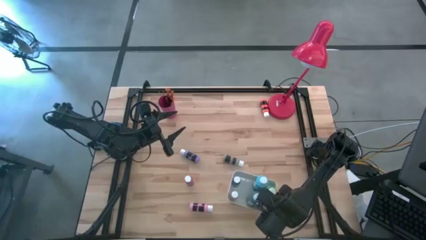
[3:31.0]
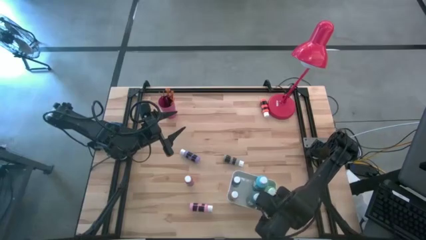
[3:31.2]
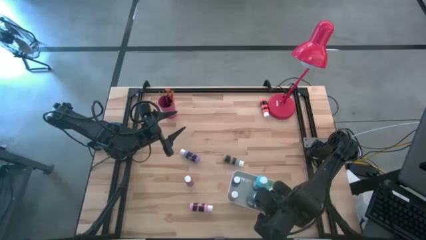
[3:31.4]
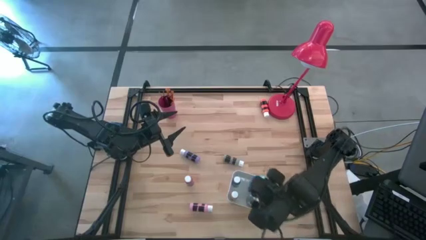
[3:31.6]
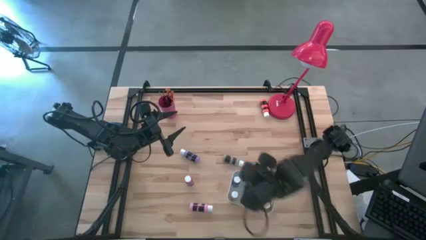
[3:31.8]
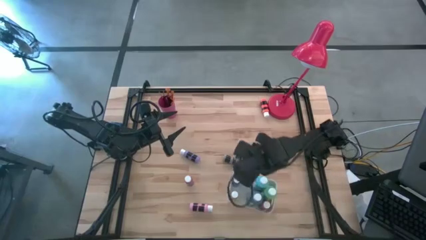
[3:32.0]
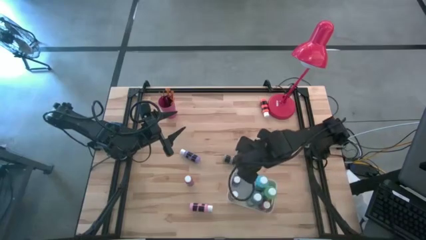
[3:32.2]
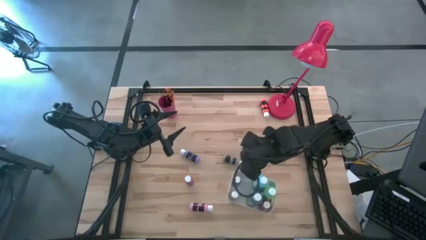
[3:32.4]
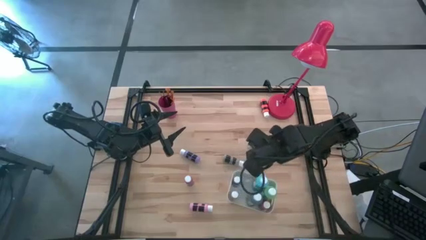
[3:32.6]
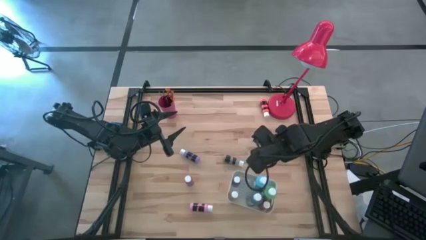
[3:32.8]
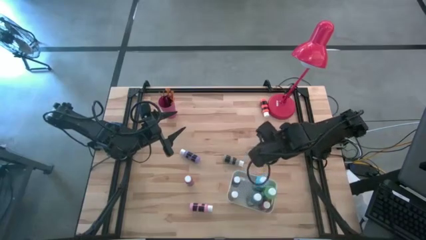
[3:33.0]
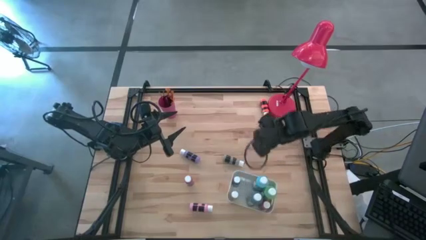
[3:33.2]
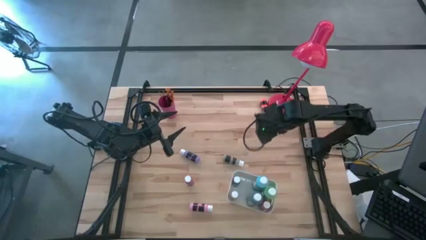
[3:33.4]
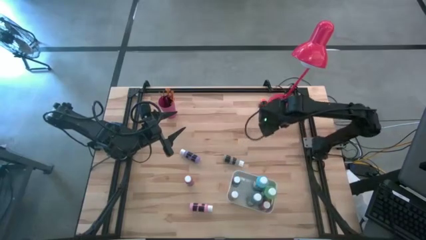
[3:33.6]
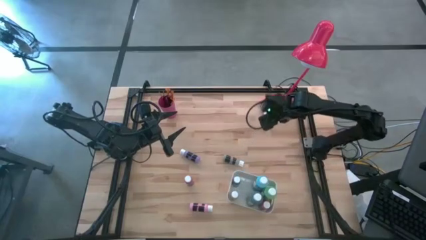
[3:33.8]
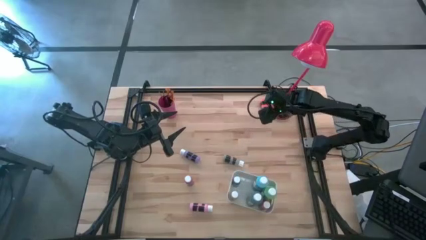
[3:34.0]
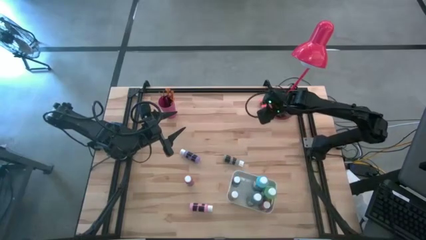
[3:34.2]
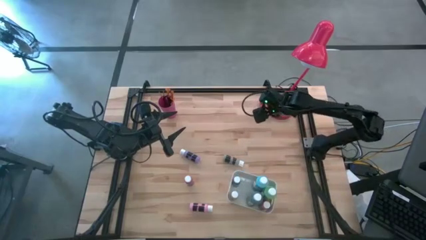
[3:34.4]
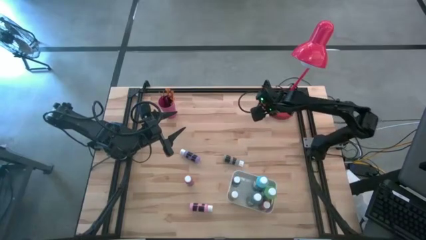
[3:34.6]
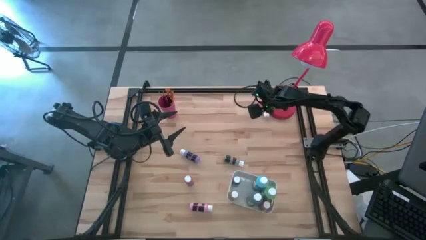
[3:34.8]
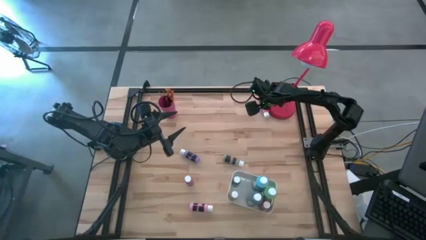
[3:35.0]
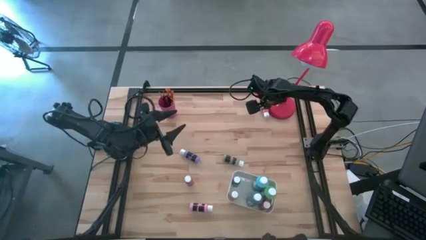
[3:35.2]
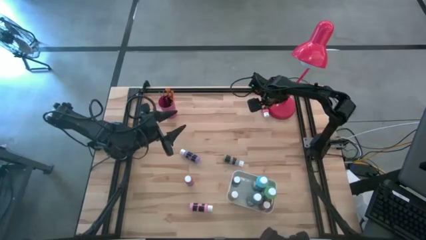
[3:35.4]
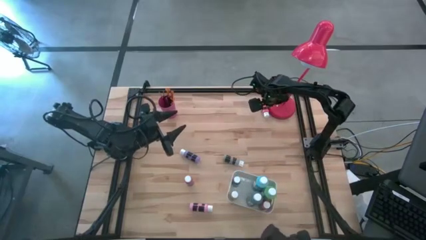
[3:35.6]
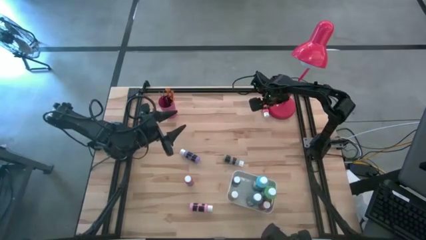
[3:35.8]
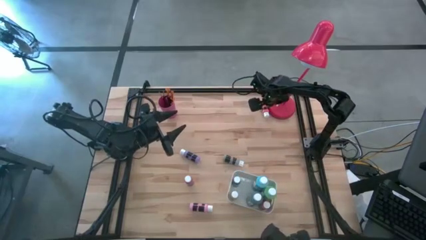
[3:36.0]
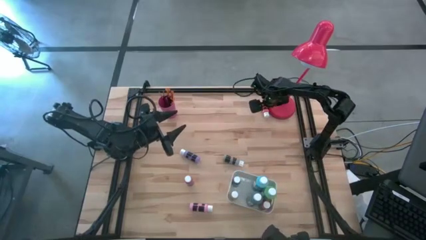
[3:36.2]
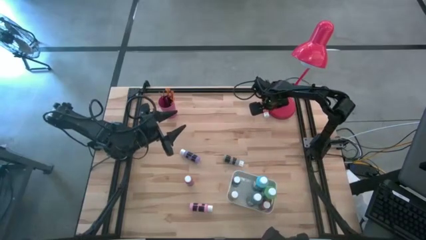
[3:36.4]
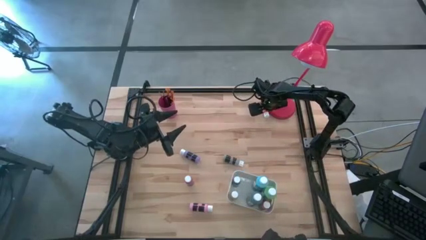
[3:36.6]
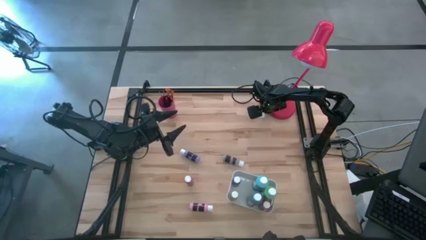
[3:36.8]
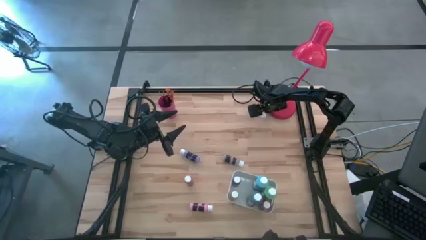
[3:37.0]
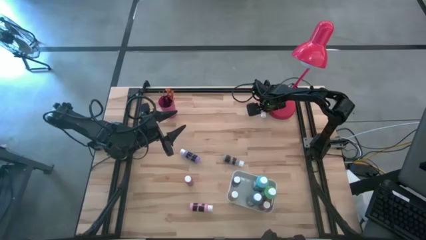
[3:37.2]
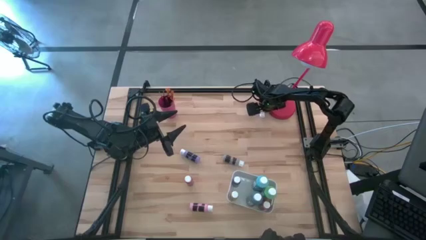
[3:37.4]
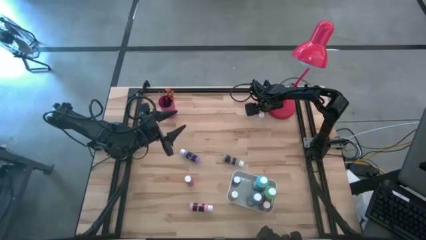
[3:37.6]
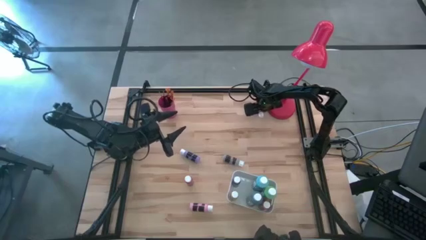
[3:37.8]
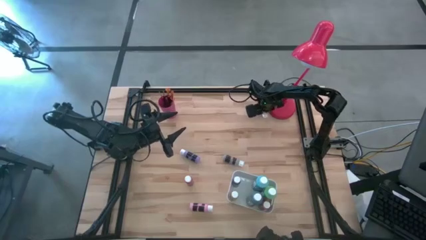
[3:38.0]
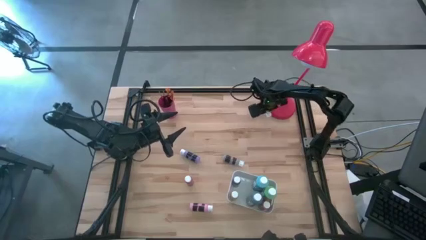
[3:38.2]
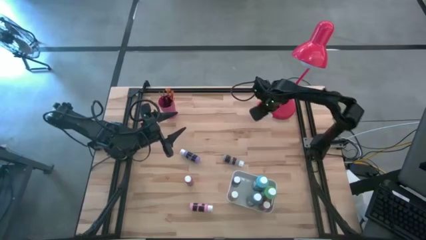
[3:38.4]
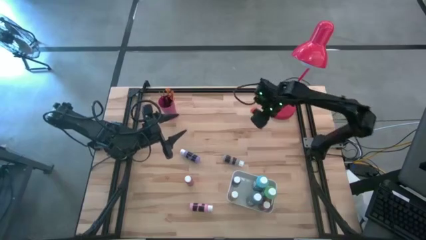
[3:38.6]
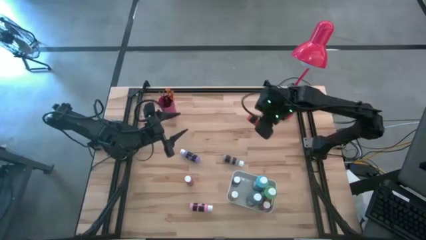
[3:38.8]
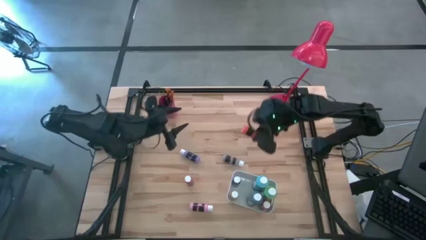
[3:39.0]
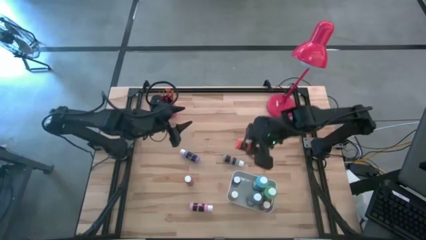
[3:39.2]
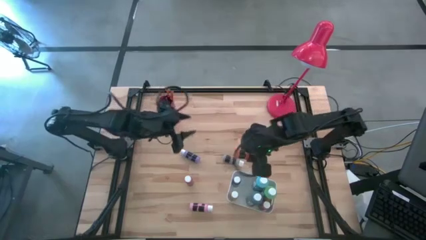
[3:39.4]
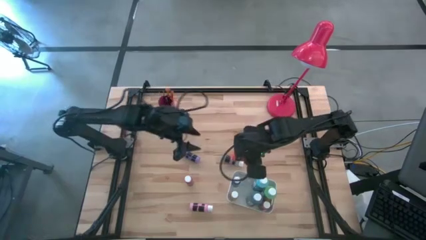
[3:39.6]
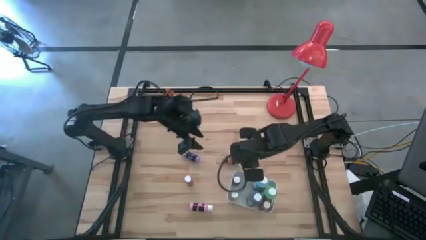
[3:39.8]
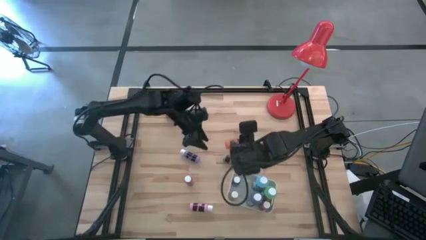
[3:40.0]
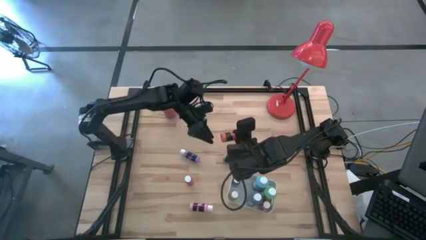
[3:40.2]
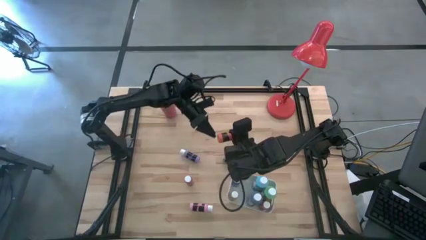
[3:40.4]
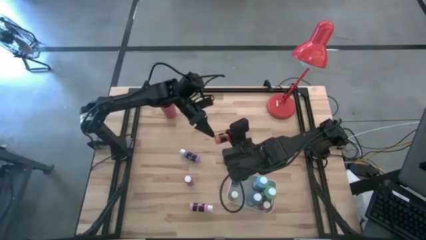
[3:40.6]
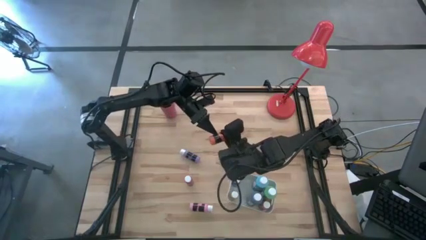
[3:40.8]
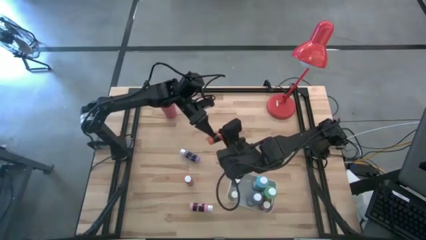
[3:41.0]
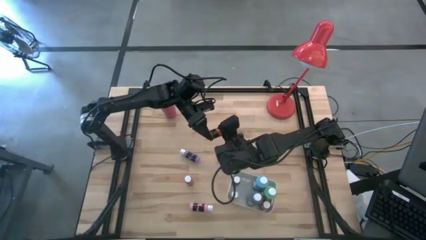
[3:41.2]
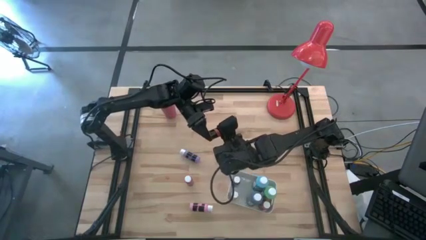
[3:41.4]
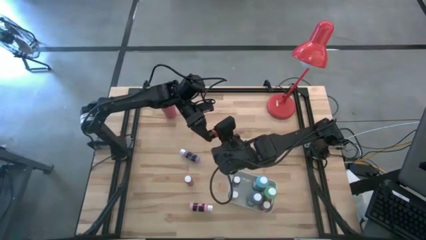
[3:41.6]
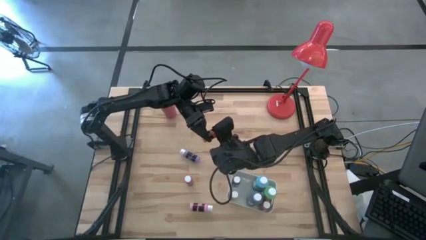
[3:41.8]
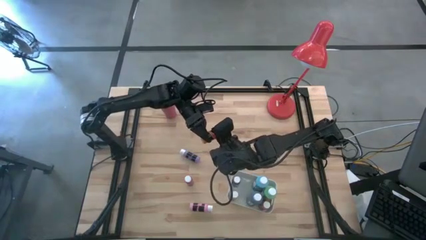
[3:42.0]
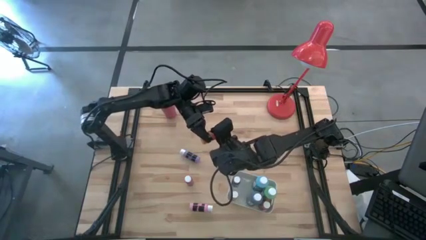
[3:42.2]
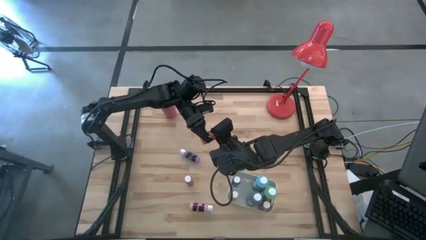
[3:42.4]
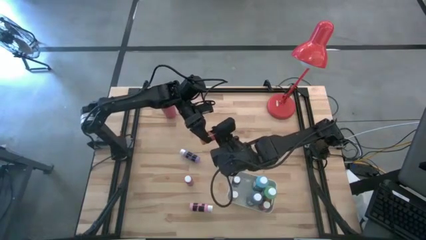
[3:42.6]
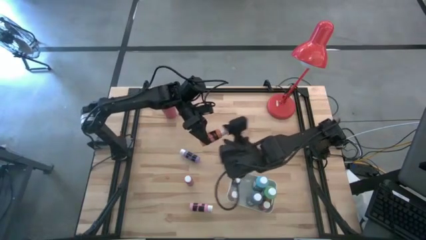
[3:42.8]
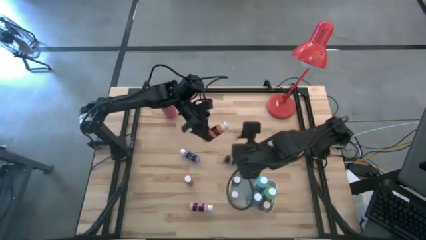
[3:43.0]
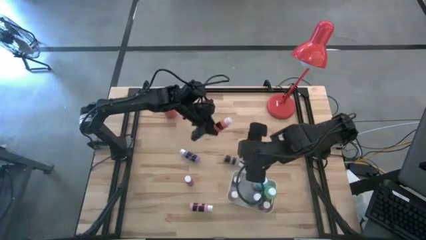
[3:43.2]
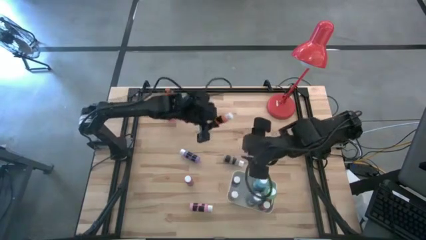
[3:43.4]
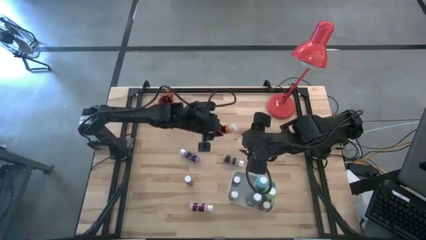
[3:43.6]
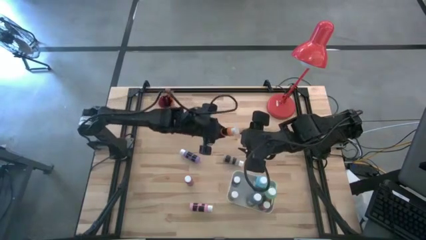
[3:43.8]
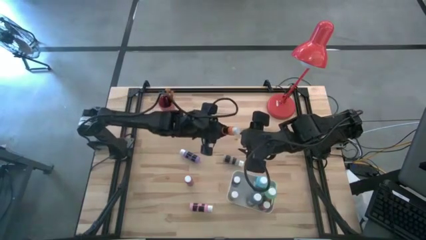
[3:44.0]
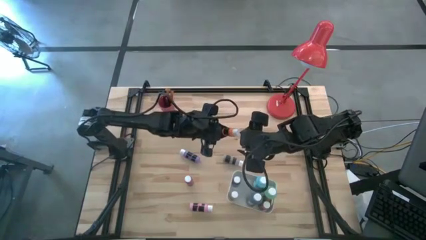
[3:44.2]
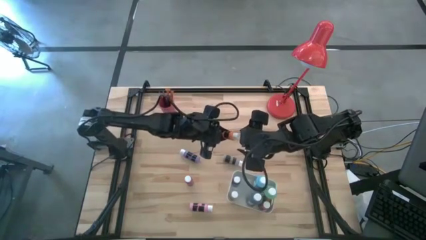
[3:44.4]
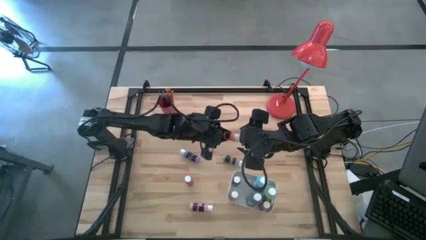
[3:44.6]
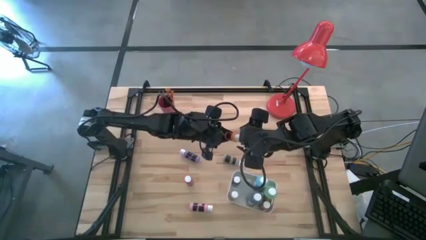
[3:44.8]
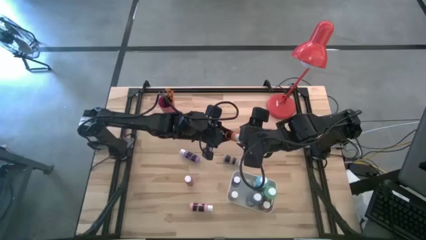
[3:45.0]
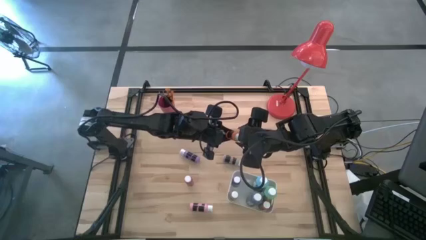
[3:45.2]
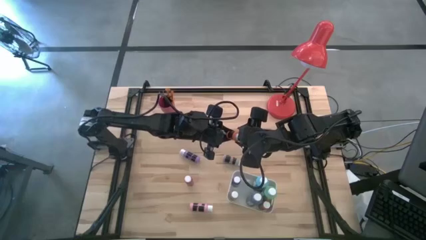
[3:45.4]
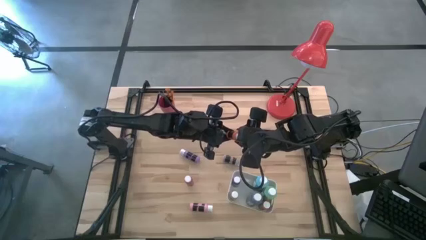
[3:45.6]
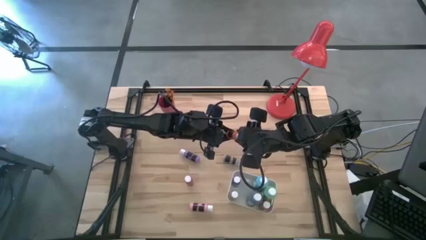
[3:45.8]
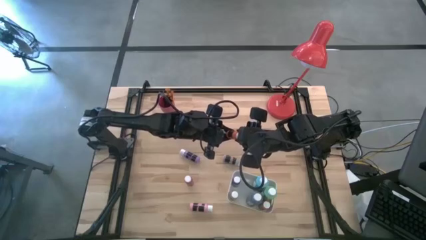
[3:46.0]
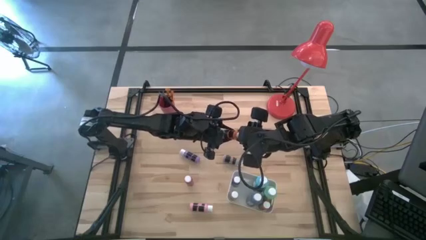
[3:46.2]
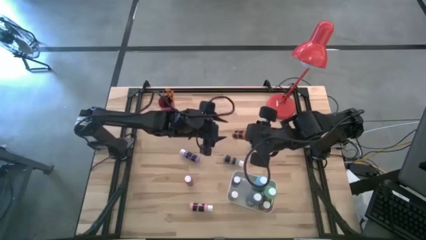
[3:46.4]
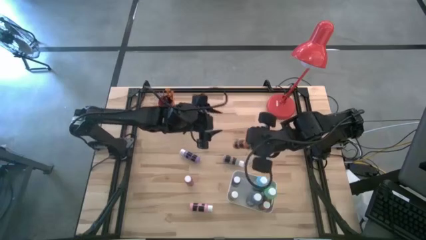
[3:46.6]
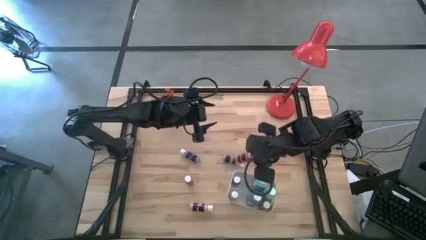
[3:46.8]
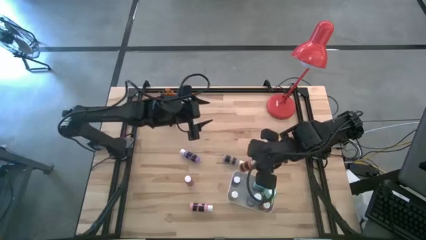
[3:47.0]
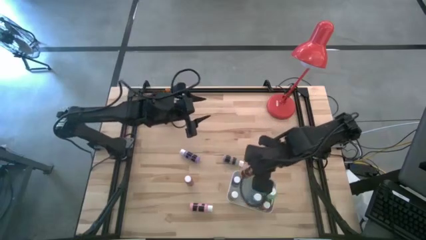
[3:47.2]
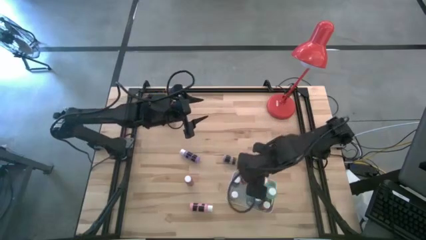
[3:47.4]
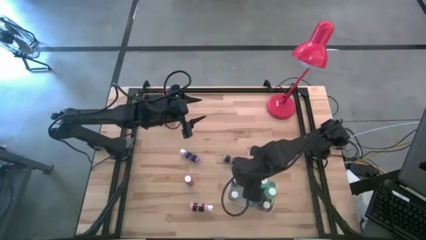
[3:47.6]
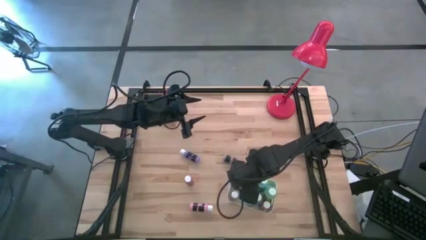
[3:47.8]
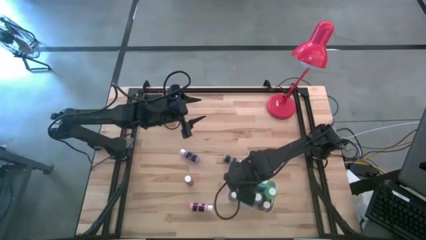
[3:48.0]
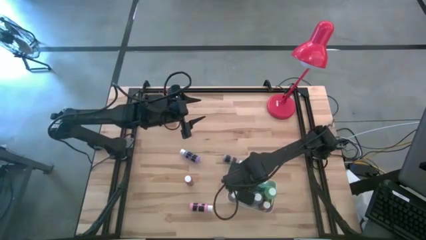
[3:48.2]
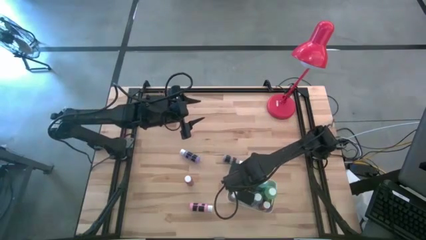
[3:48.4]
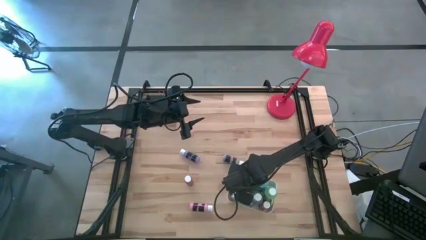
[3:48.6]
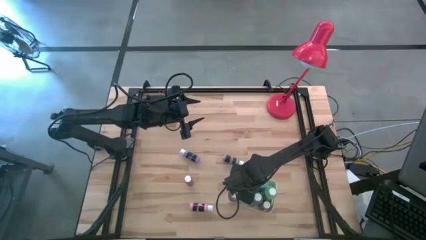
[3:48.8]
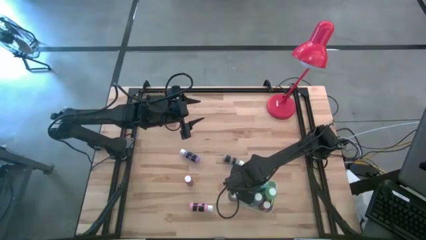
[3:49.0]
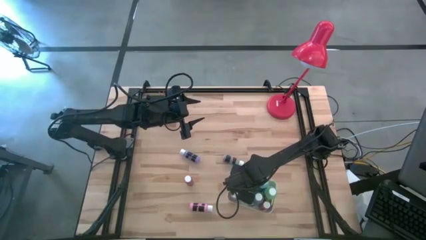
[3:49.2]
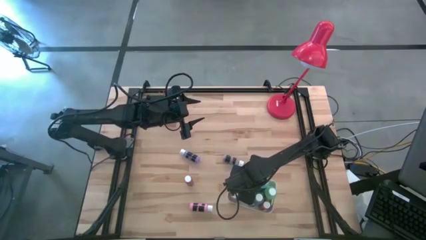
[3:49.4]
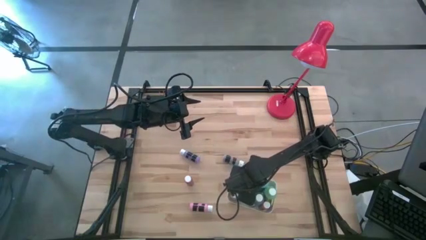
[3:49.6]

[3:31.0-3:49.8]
Task: Pick & Place Paint Supplies
Put the orange paint bottle into the white bin
